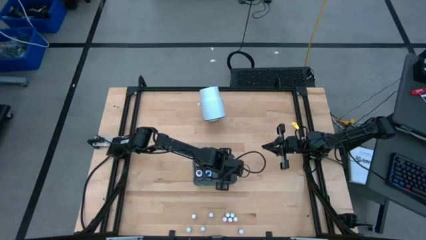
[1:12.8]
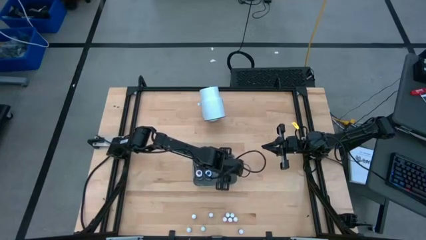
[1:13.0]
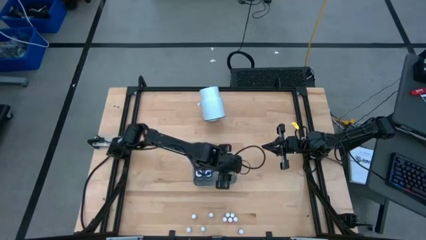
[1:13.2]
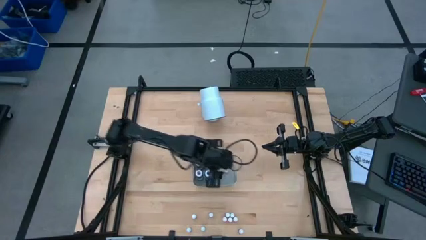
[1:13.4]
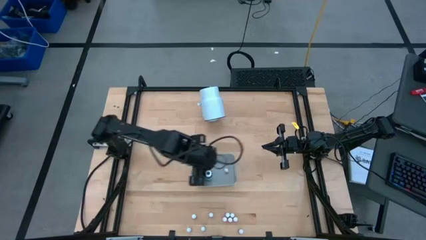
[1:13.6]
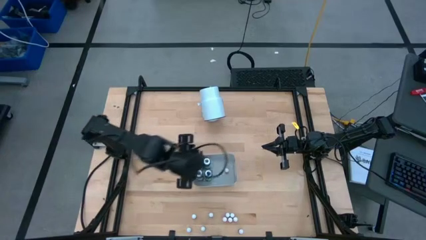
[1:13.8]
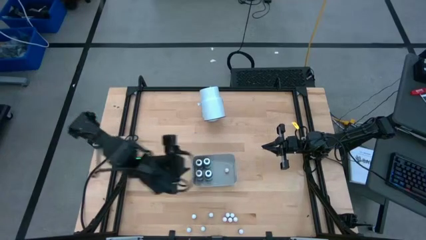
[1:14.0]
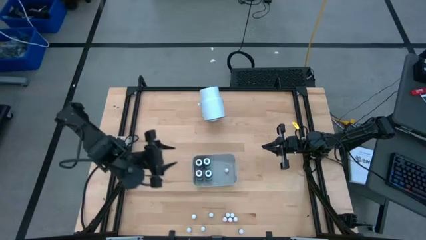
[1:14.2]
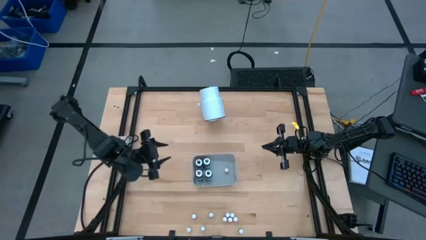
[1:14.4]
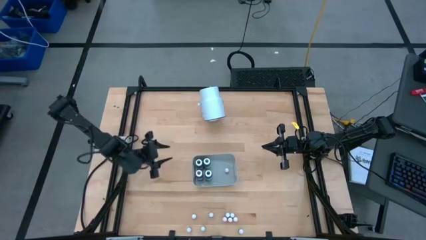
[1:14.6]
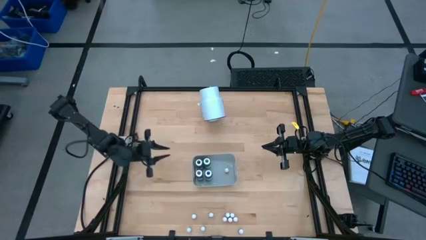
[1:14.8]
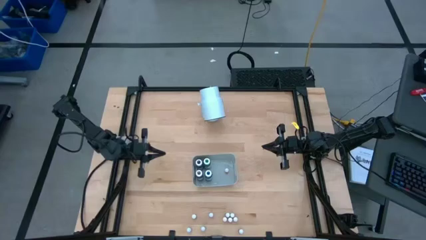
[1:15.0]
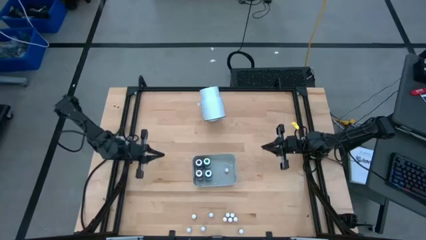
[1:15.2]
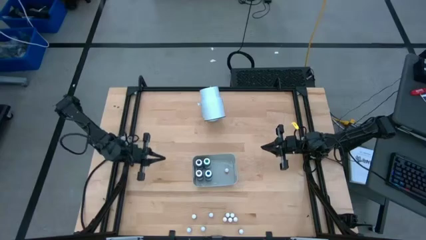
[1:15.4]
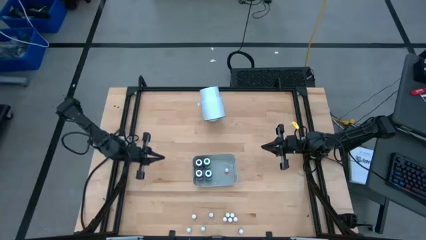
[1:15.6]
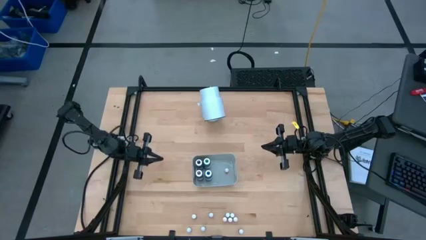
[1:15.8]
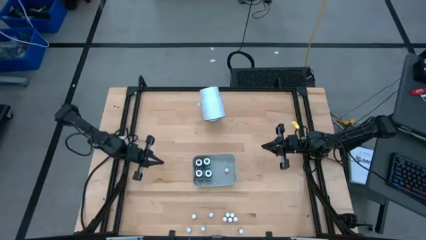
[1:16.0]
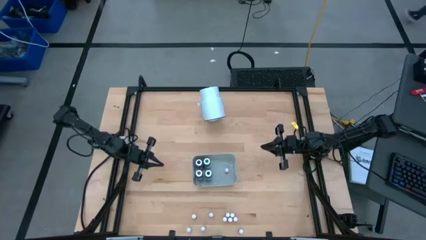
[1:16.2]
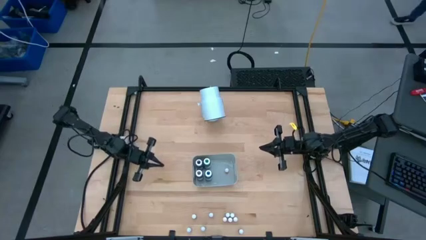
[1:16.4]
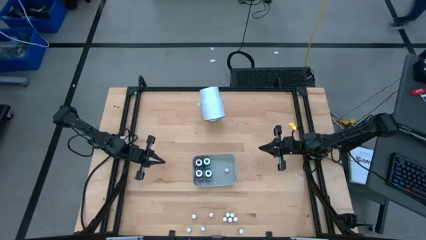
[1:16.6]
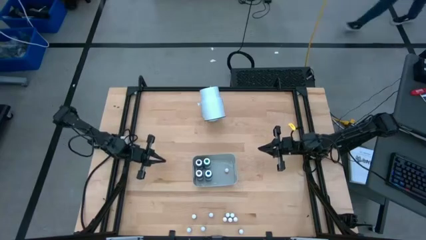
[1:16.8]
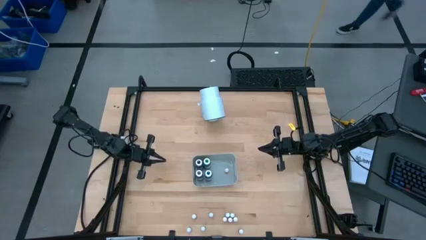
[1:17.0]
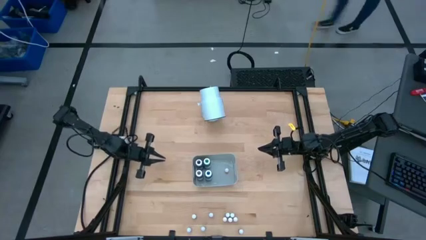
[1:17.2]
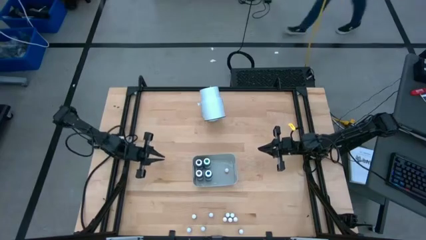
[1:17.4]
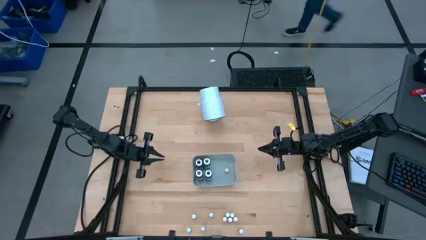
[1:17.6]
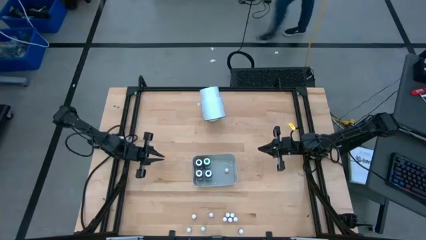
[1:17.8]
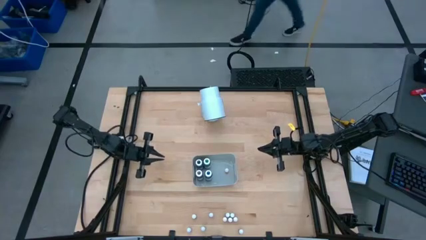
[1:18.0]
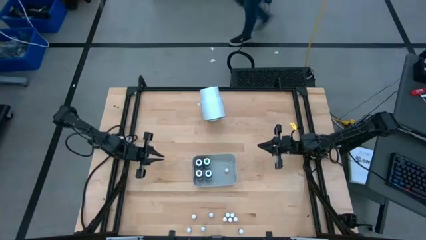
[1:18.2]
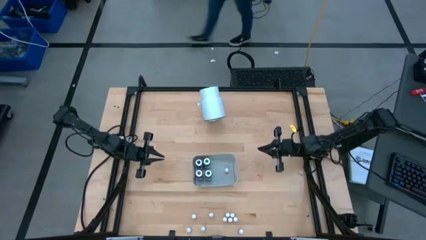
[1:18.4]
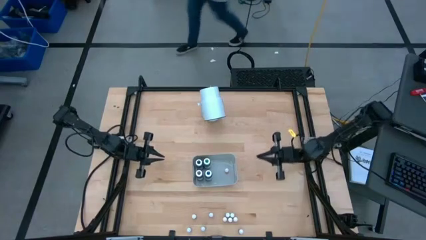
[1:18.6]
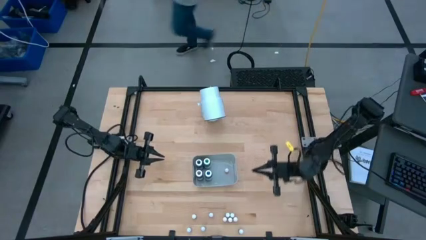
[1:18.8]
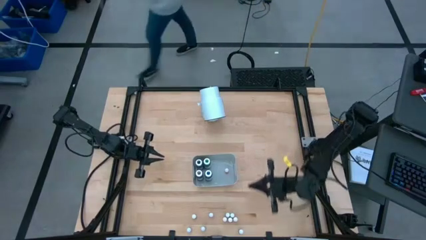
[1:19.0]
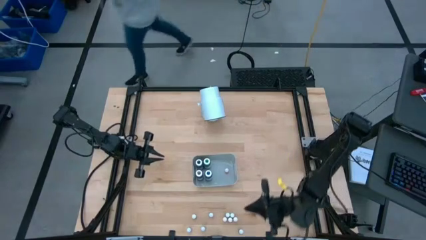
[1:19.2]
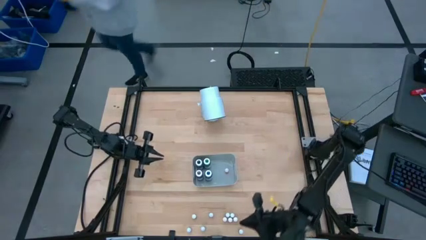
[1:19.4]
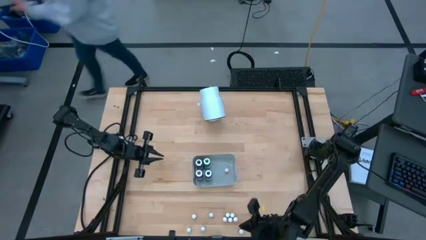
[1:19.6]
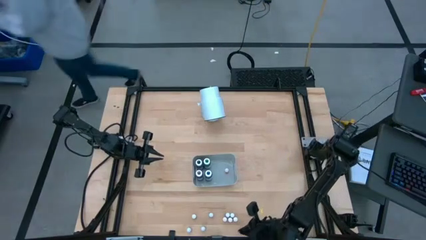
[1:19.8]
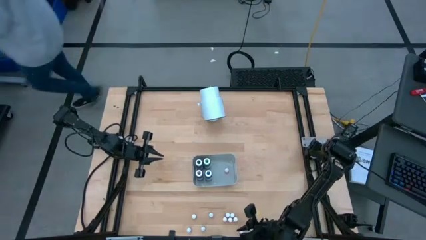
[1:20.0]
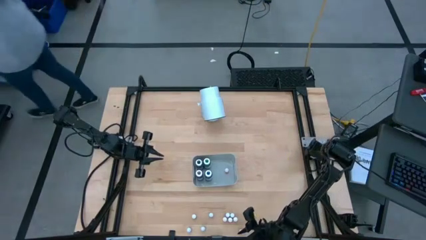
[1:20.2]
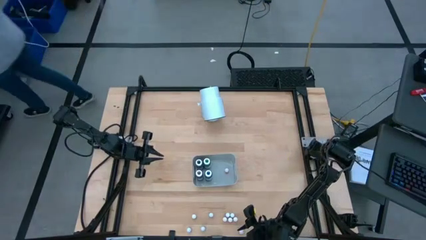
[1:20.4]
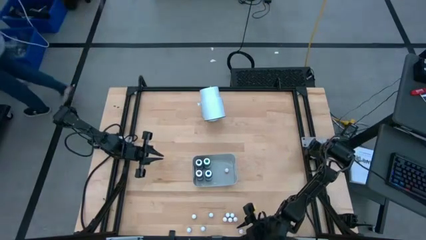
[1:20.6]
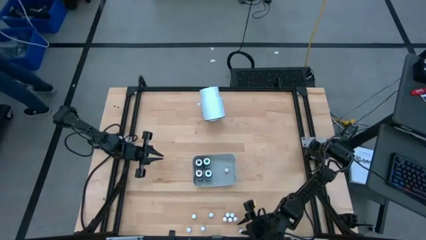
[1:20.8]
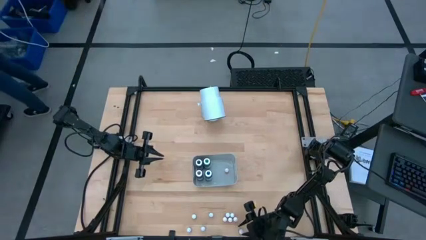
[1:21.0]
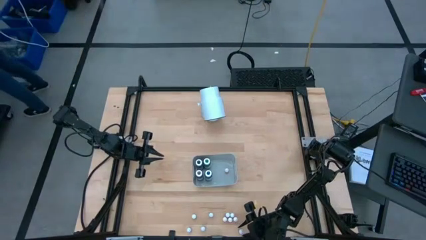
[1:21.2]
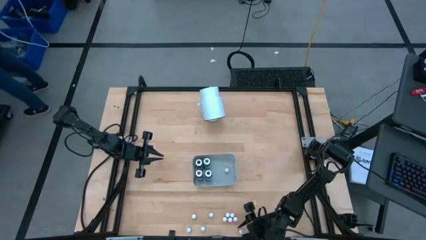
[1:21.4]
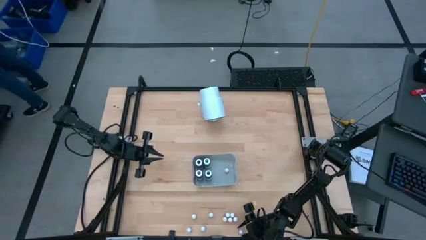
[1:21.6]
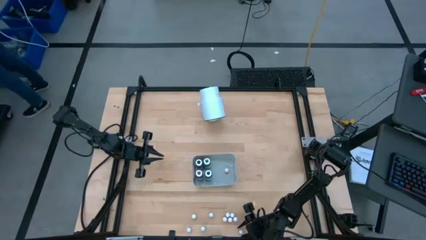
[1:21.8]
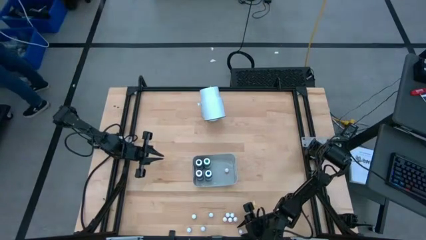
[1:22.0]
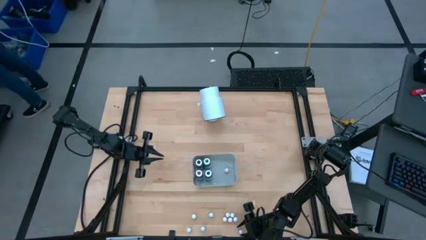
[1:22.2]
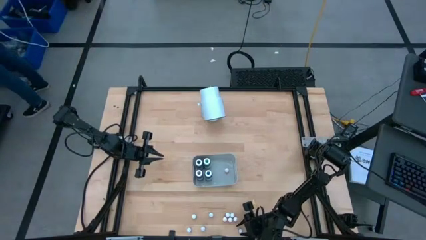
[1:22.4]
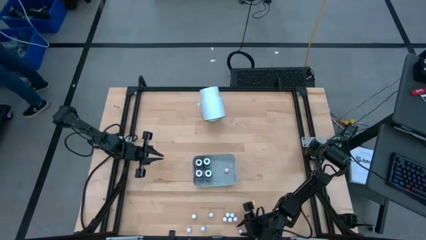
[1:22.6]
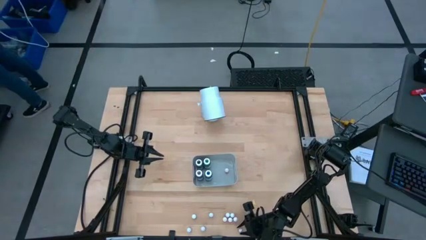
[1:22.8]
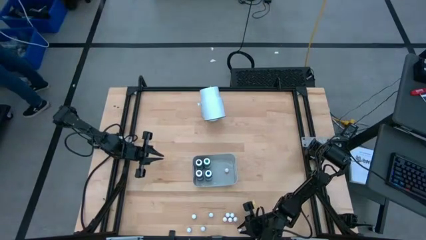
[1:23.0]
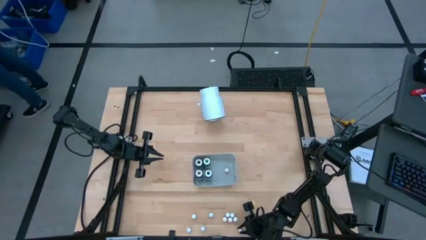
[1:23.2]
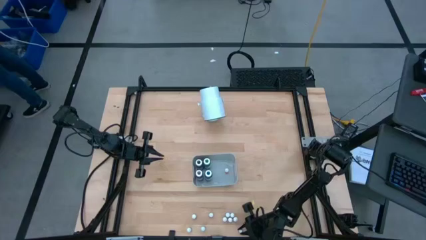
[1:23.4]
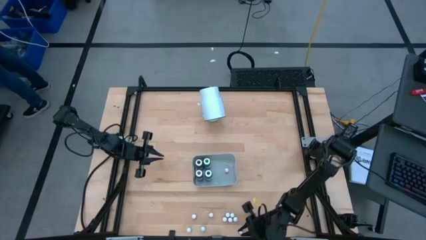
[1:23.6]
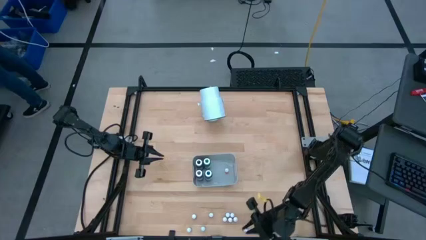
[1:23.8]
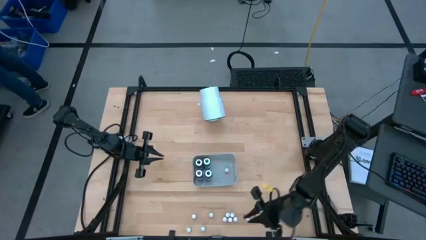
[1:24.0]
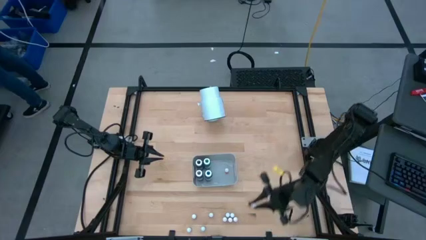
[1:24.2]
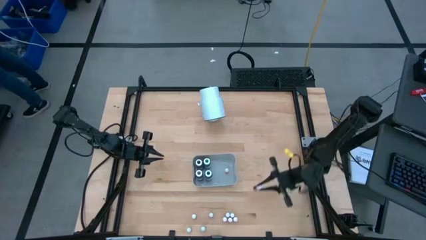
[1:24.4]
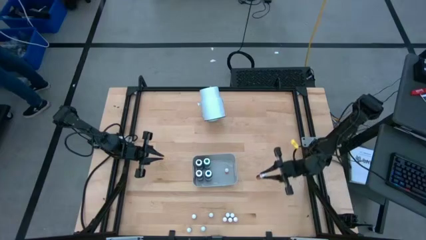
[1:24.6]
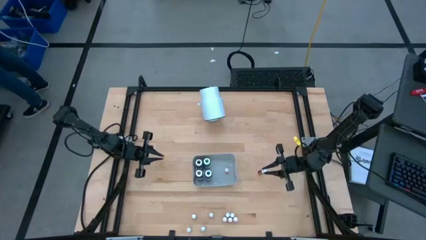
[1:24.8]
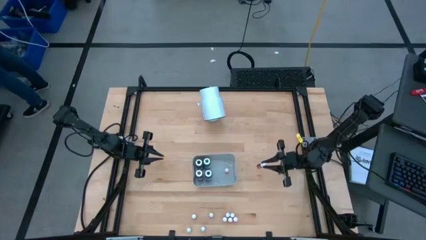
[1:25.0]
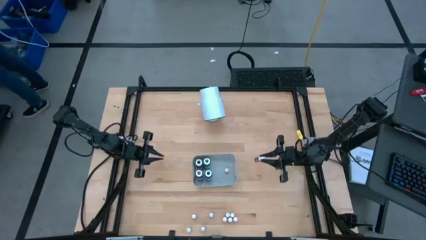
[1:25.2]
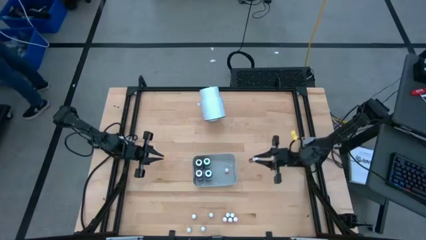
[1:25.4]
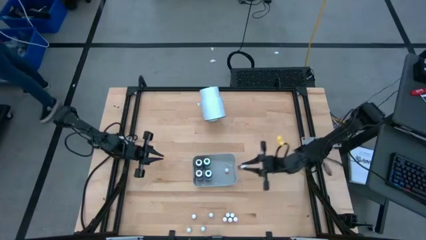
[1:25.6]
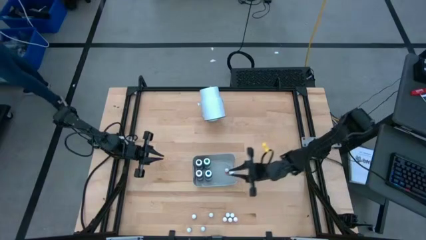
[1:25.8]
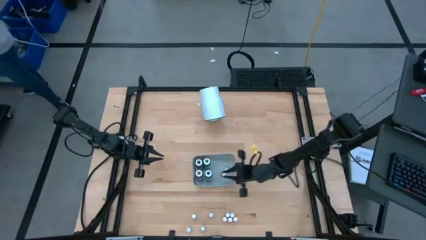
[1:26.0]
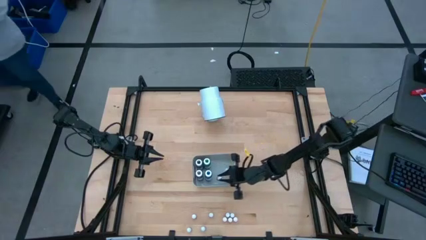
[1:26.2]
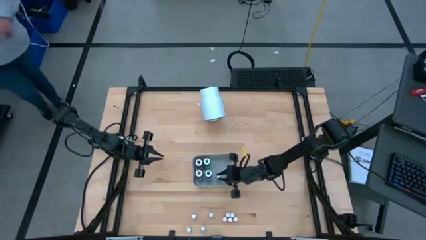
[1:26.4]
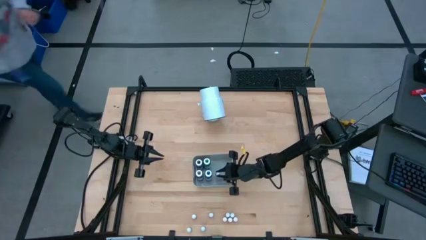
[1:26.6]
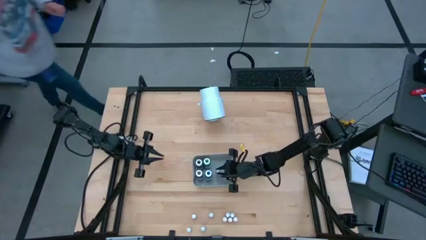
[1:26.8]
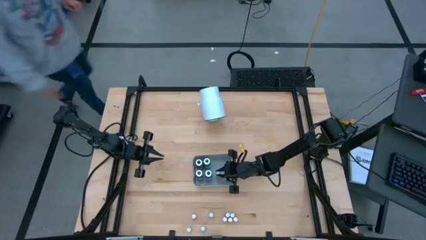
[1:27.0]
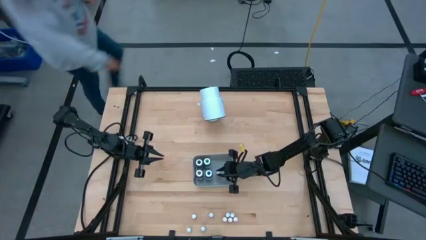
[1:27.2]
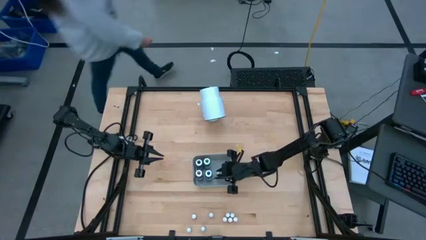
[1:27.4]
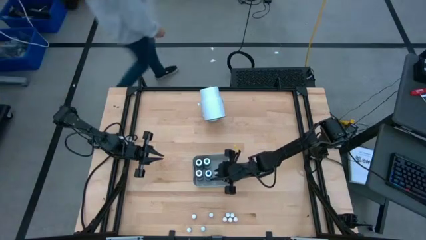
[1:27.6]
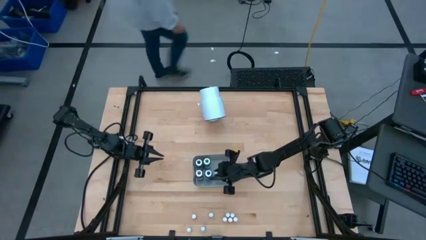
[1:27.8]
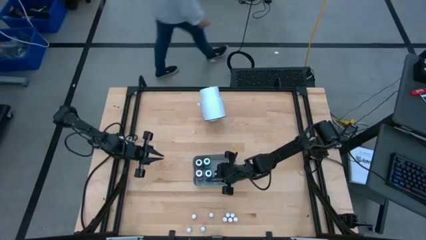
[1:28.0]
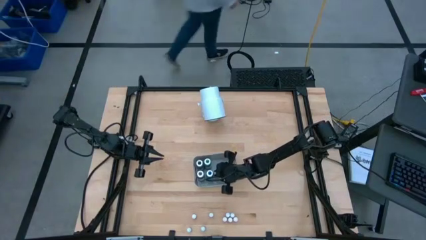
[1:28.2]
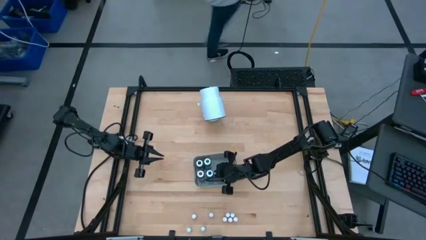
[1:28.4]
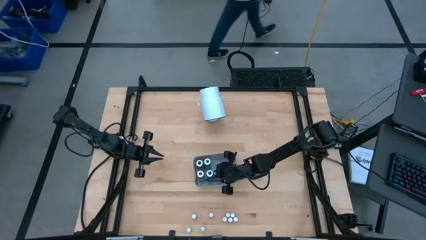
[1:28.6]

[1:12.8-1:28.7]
Task: Pick & Place food coloring
Put the small red food coloring into the gray bin

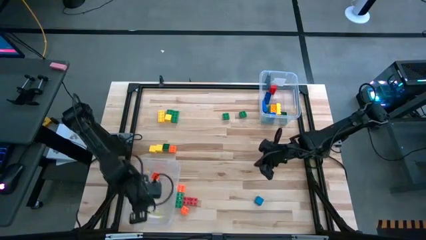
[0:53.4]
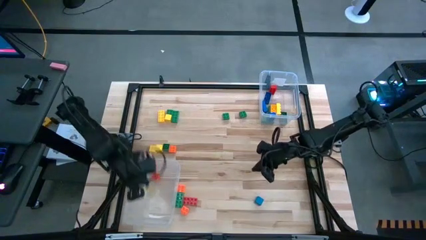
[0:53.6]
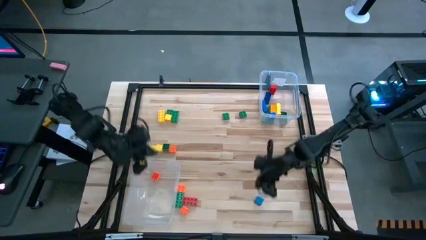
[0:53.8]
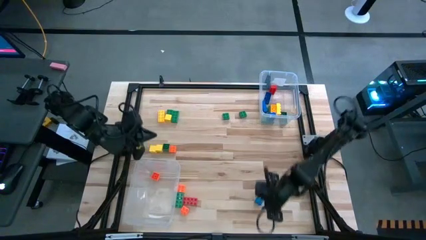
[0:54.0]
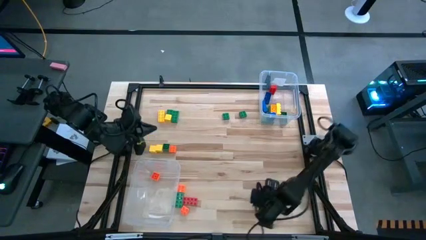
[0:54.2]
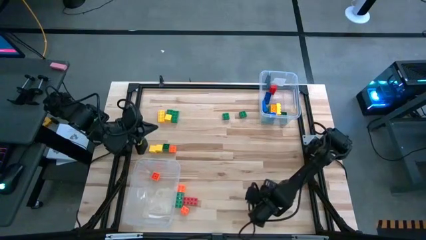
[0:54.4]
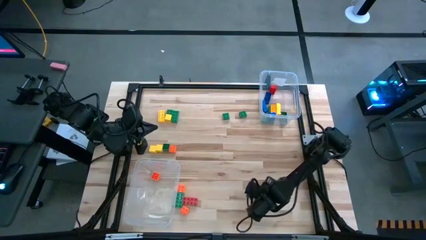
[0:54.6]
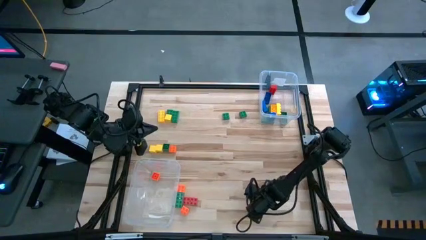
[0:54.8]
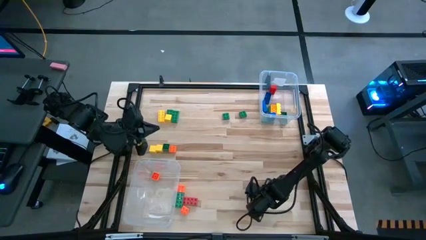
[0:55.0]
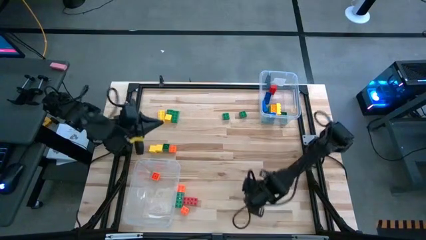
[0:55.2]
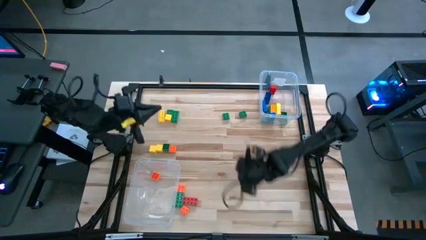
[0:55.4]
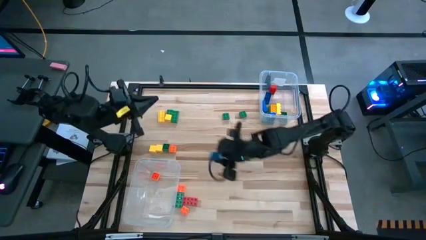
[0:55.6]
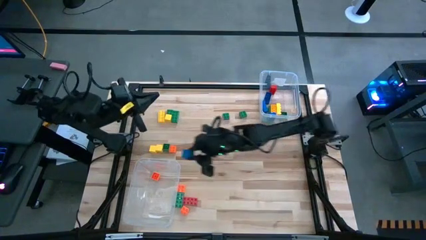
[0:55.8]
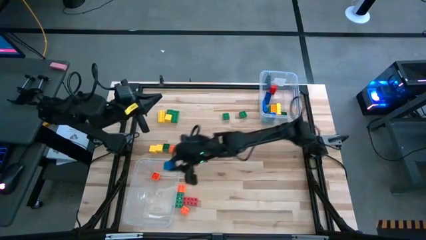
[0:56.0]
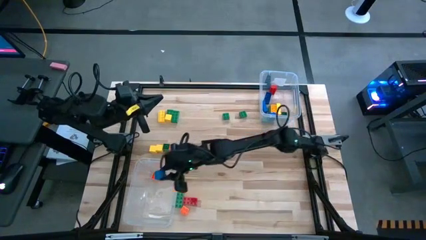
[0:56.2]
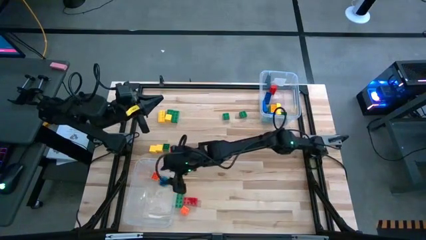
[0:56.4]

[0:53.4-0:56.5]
Task: Sort blocks by size
Put the small blue block into the left transparent bin
